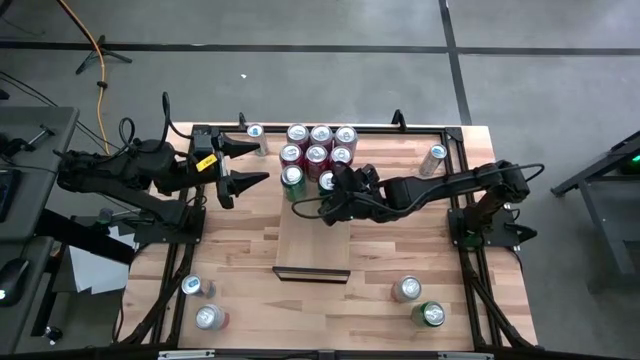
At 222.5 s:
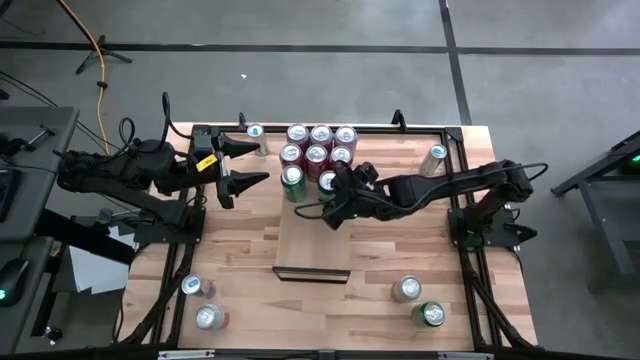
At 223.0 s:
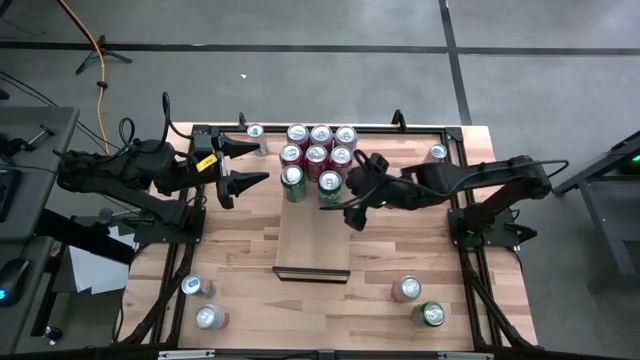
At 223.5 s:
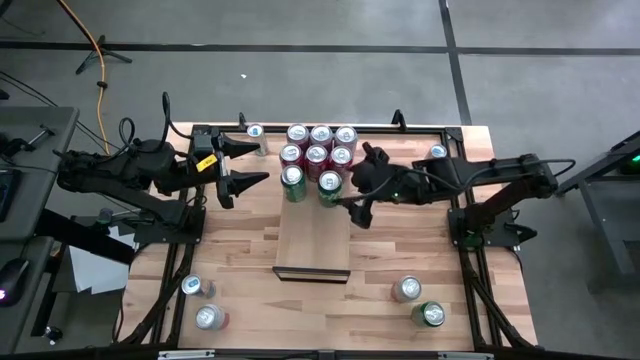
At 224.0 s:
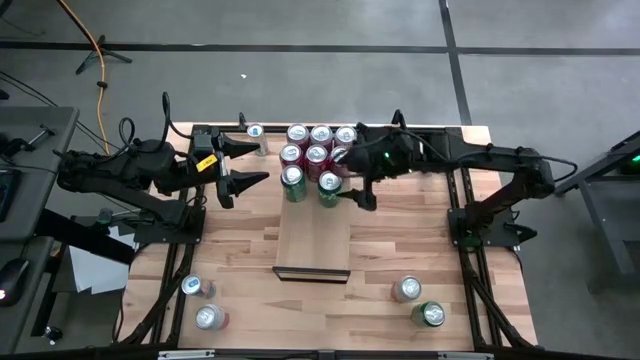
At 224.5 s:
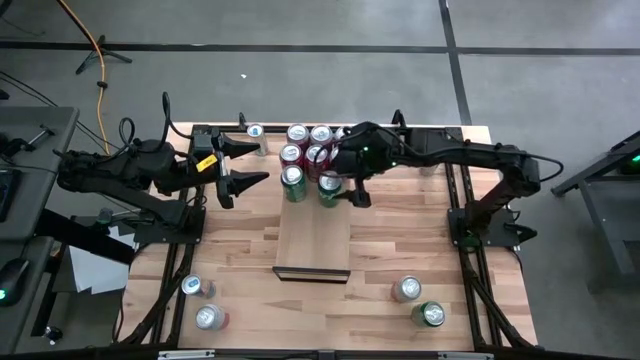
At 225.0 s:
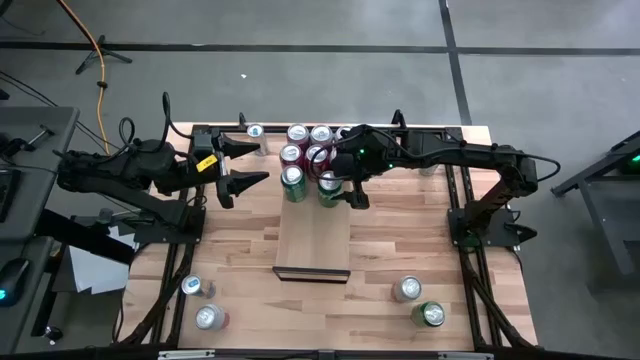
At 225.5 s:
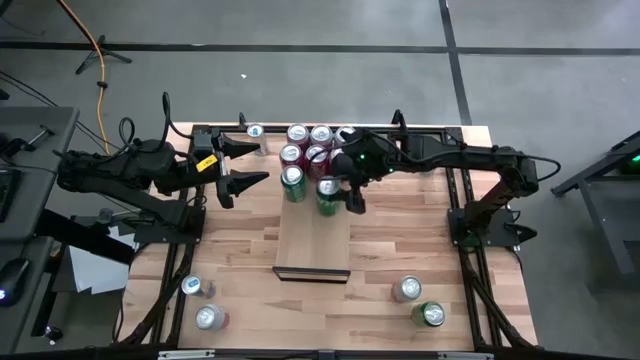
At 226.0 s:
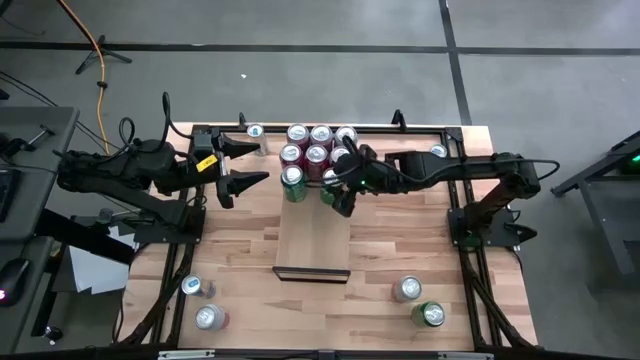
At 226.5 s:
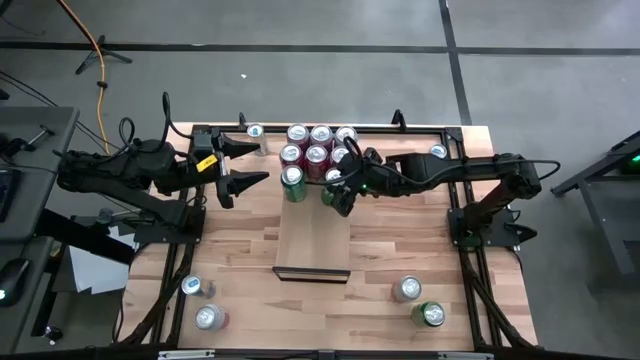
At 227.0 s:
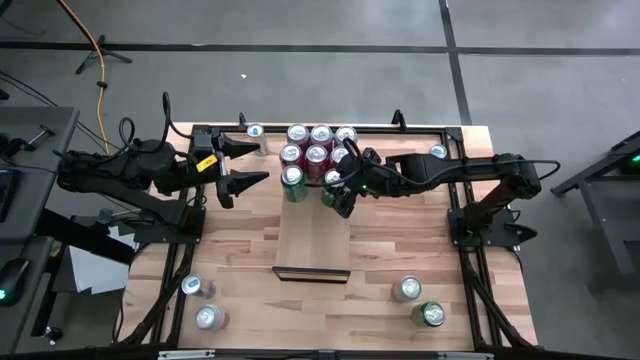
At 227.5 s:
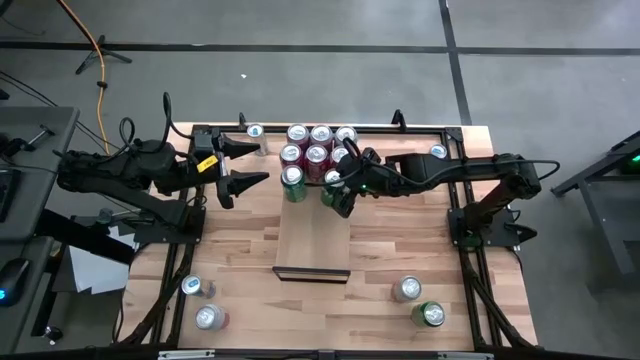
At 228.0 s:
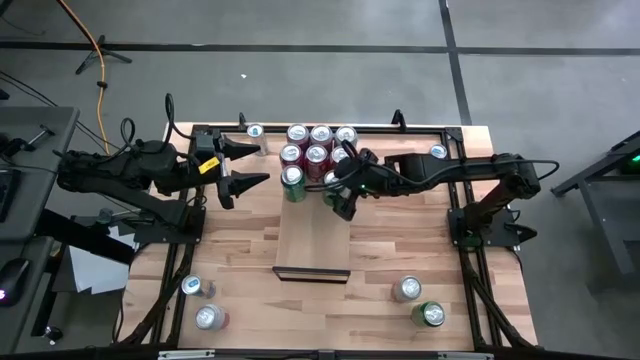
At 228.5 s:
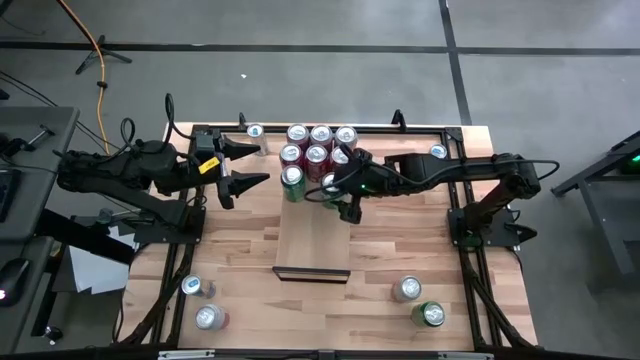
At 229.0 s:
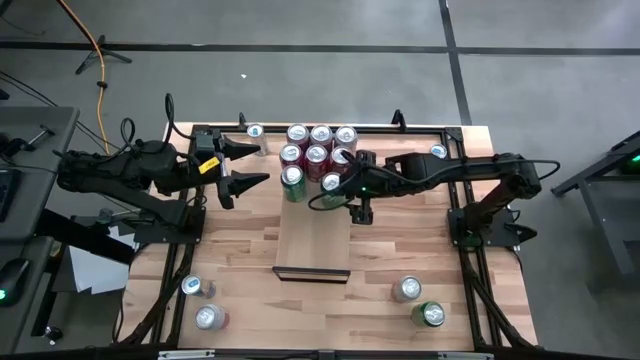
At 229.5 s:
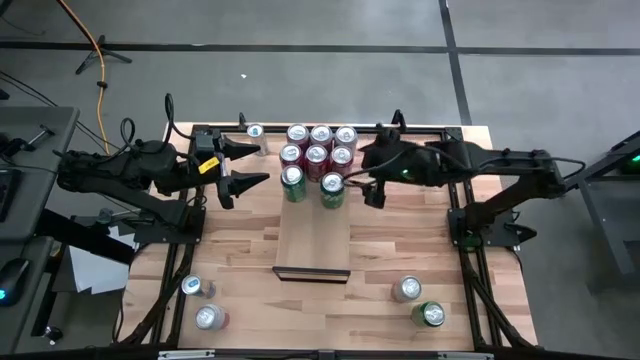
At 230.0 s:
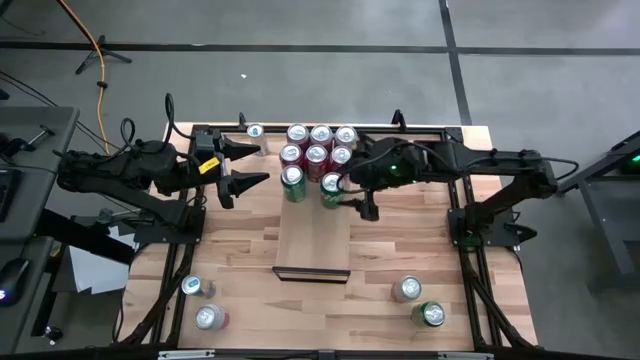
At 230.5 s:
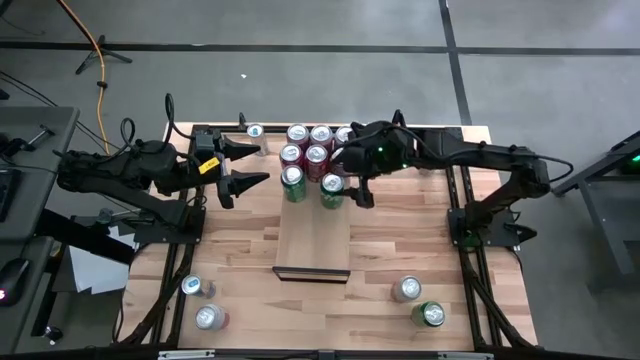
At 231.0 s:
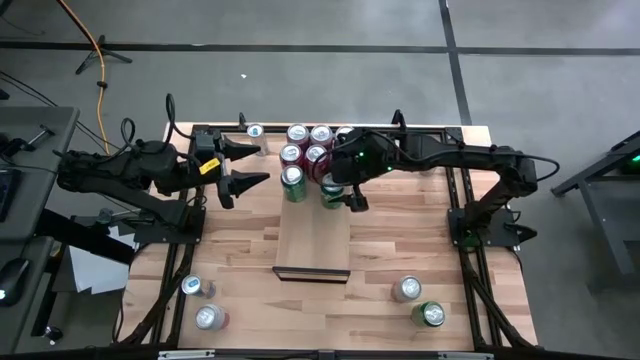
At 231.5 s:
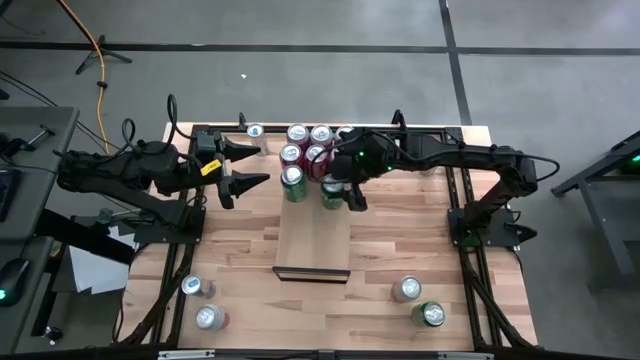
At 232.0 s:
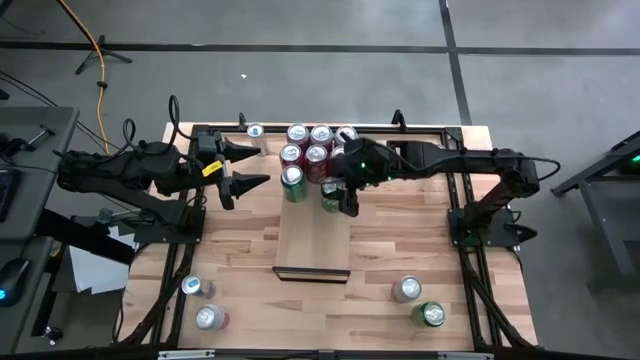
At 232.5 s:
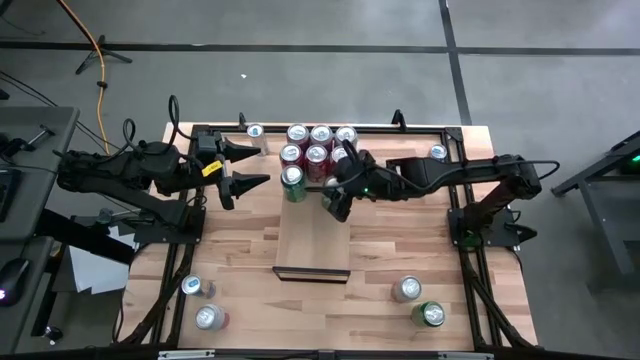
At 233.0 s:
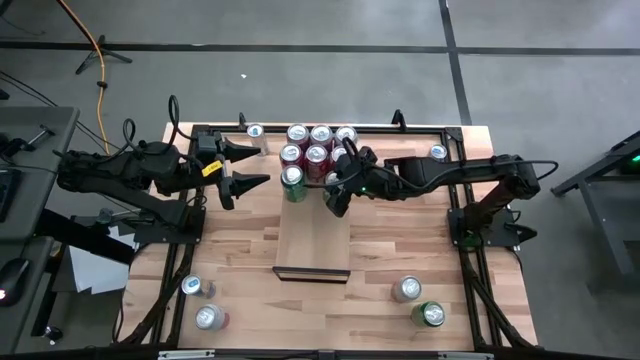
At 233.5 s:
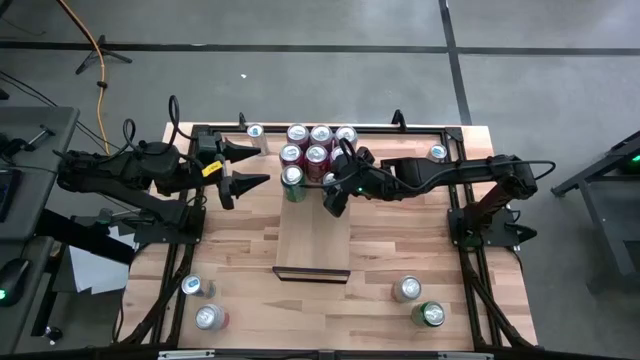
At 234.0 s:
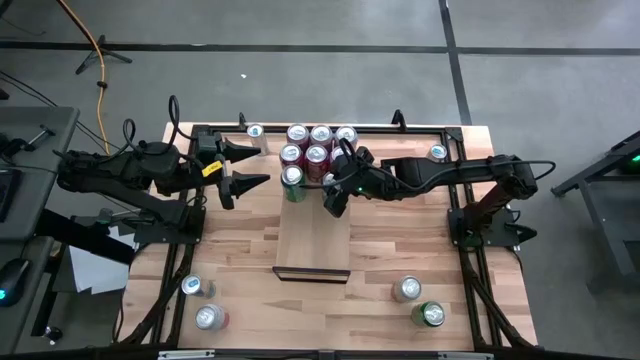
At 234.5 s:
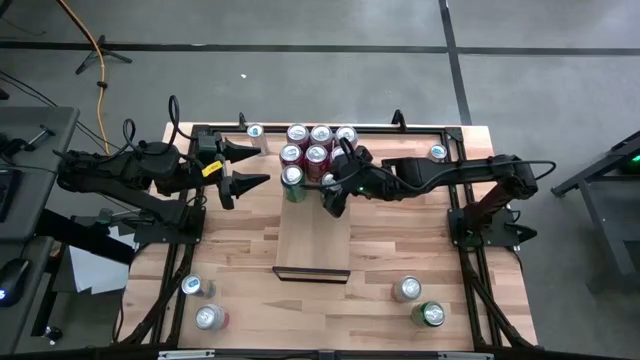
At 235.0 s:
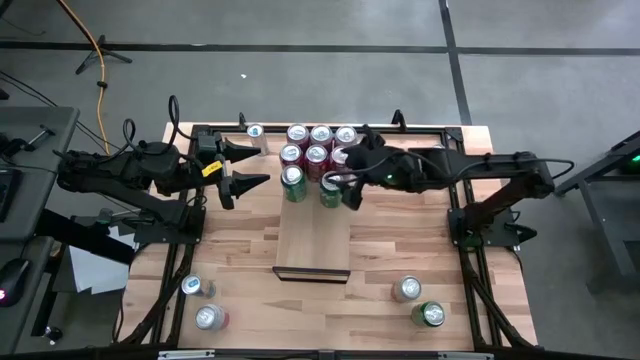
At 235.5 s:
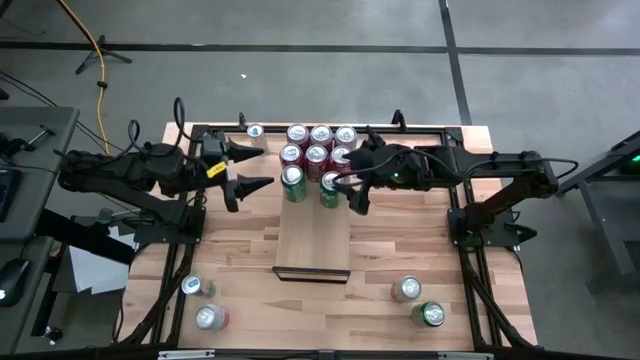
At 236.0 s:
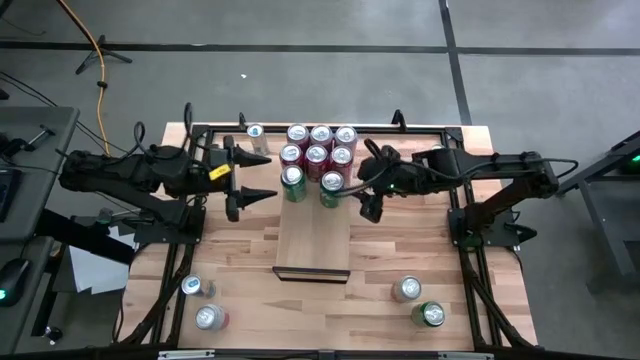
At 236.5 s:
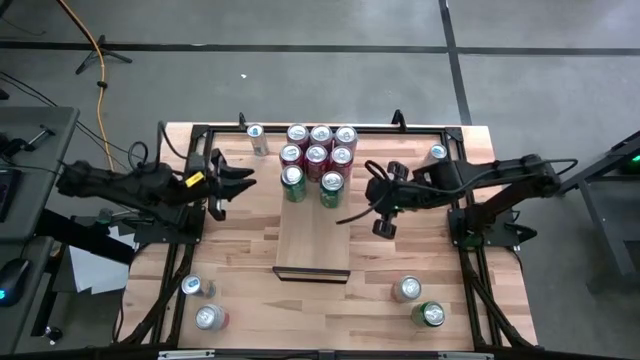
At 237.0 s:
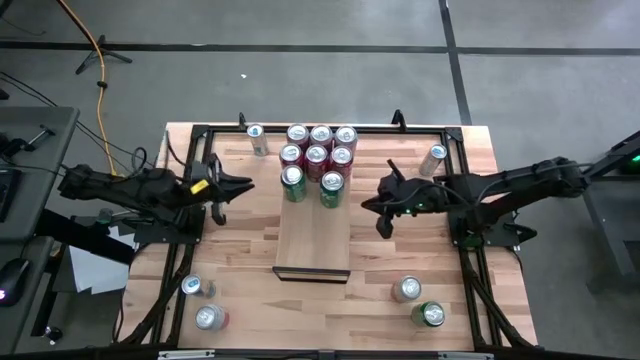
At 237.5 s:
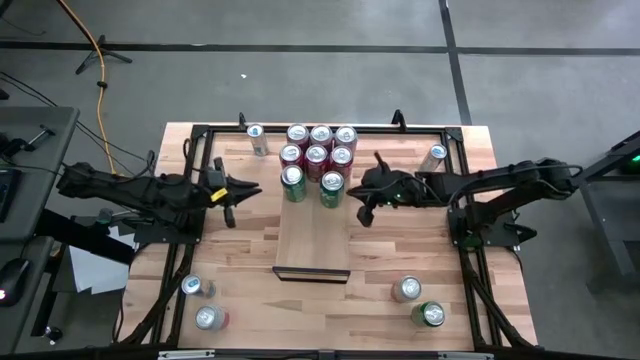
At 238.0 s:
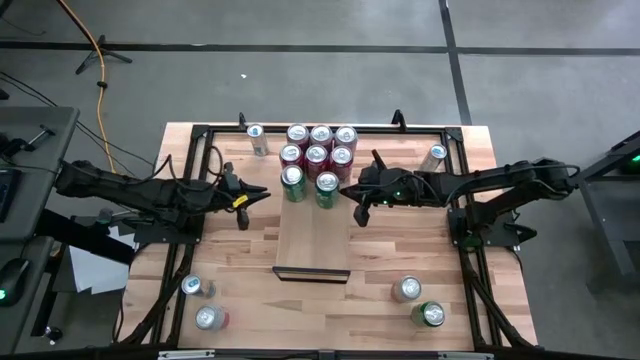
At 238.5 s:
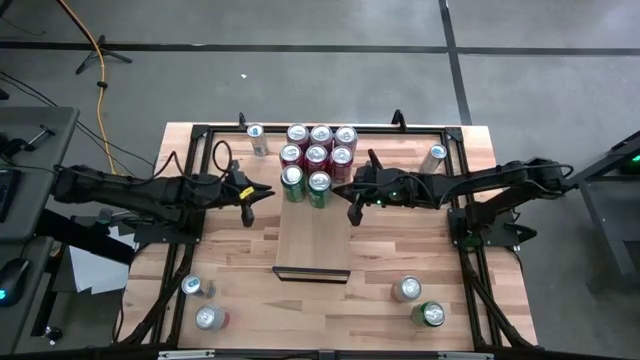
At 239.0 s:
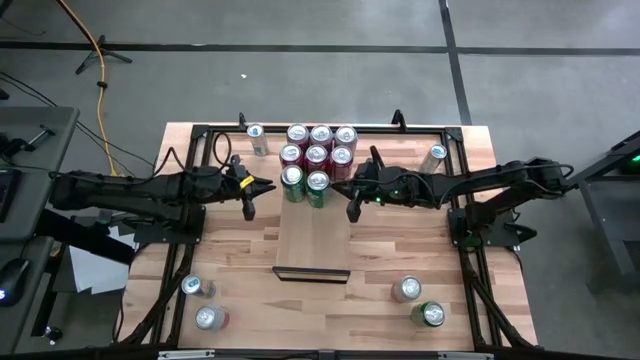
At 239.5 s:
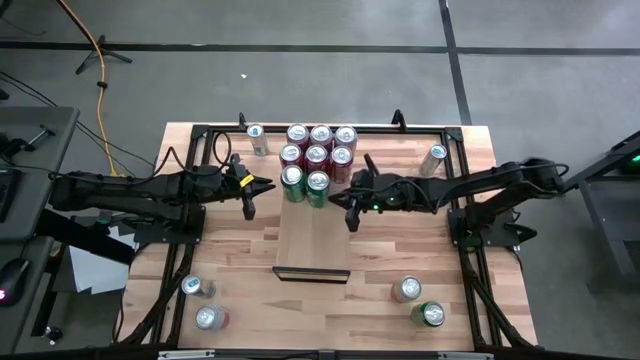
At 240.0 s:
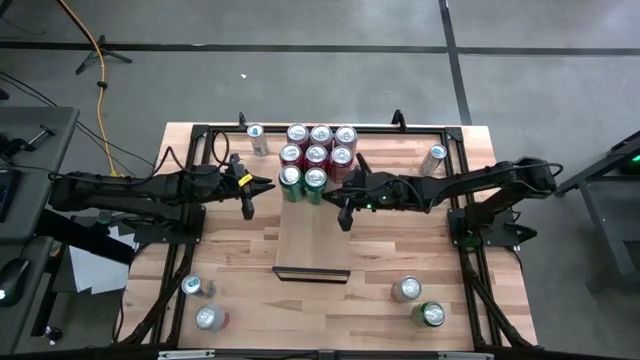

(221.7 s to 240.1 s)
Task: Place canned beverage on shelf
Put the top left green soda can on the shelf

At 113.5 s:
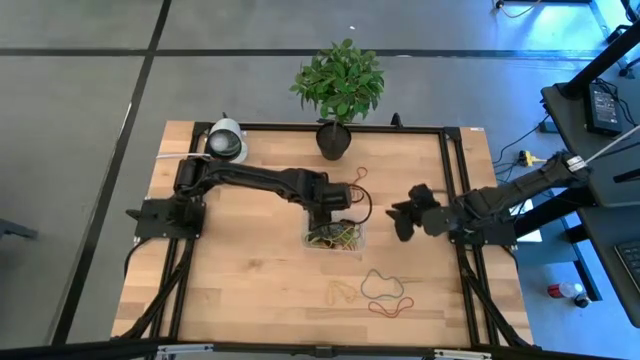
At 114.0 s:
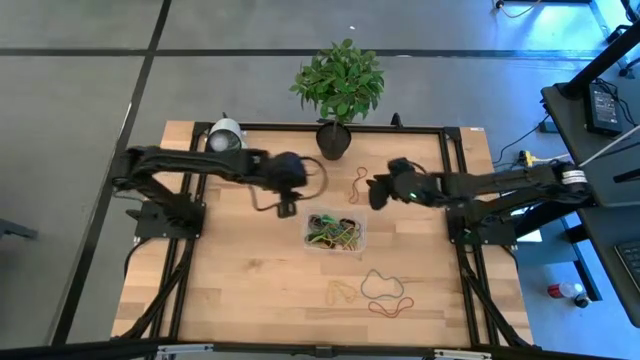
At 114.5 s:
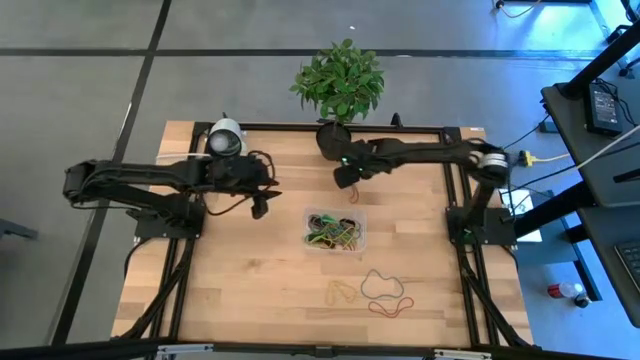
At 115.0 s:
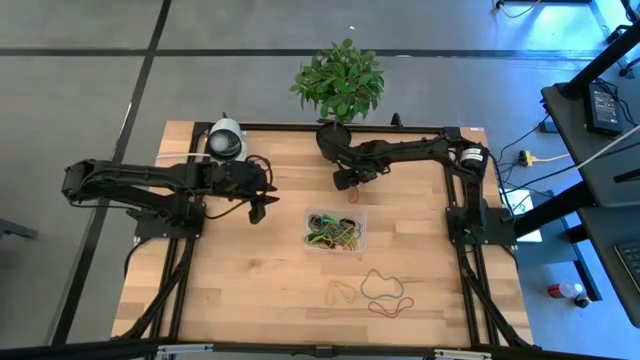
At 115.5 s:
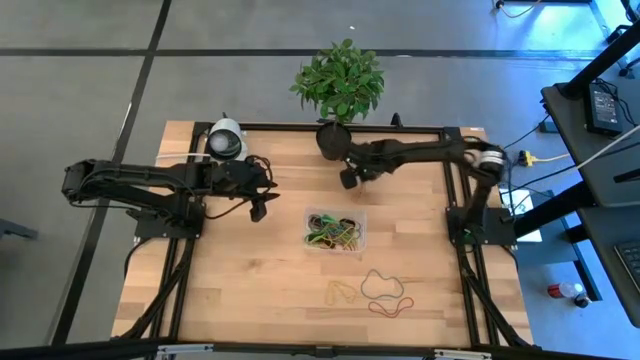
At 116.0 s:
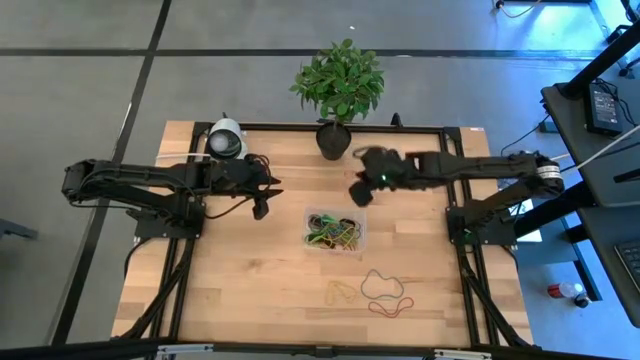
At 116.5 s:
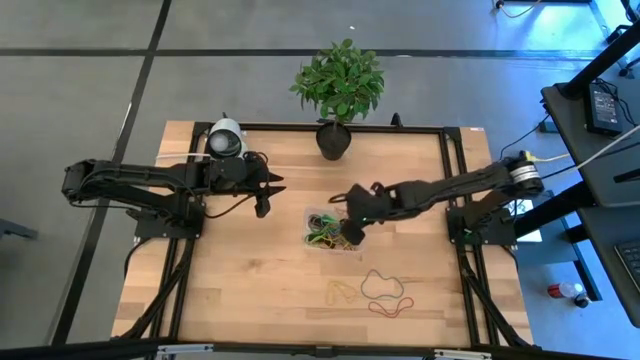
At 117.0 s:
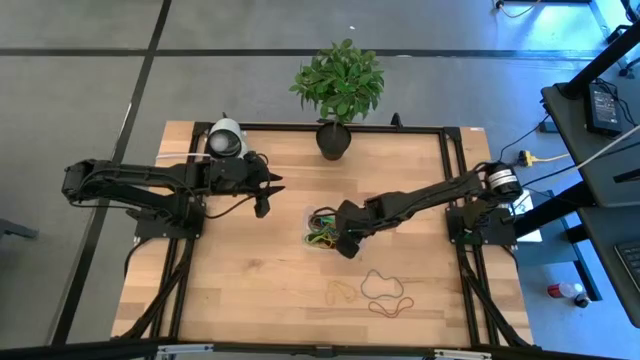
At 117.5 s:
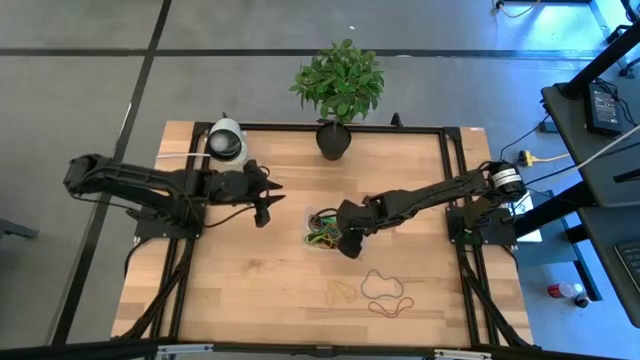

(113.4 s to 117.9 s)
Task: Pick and place rubber bands into bin
Put the red rubber band into the bin
